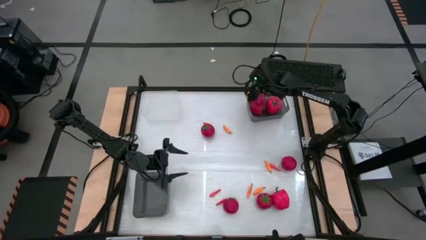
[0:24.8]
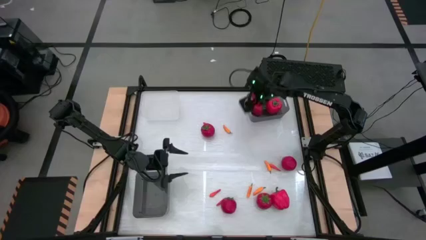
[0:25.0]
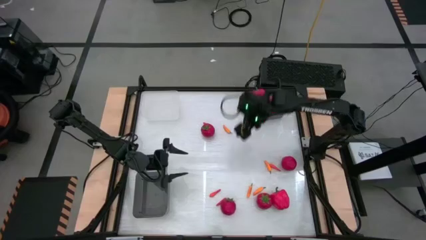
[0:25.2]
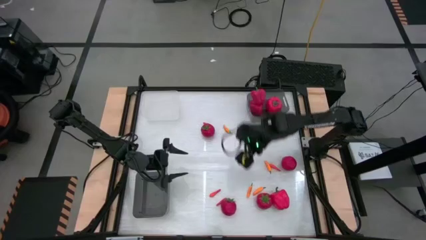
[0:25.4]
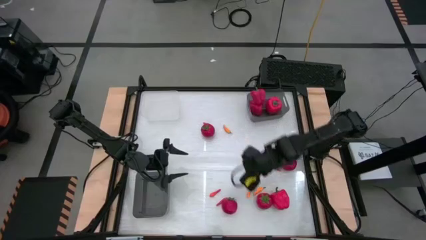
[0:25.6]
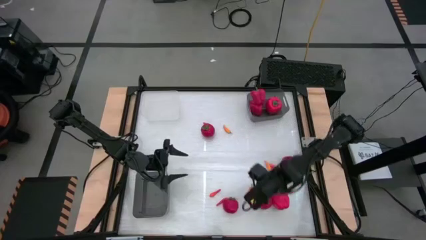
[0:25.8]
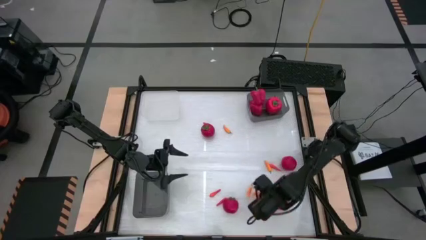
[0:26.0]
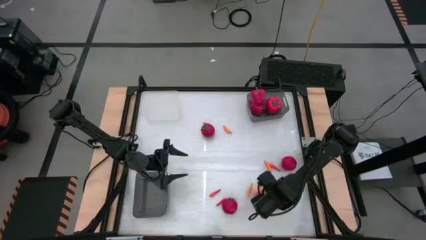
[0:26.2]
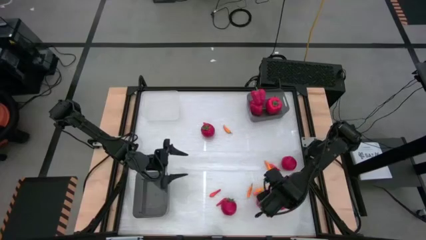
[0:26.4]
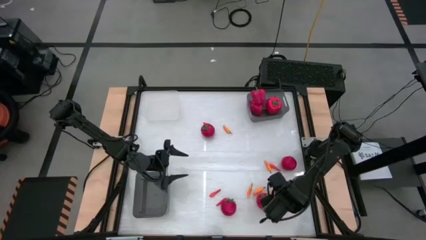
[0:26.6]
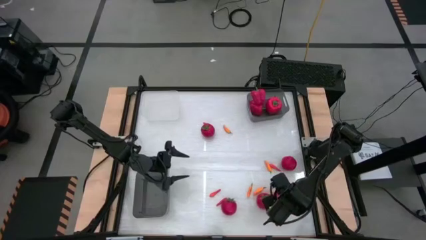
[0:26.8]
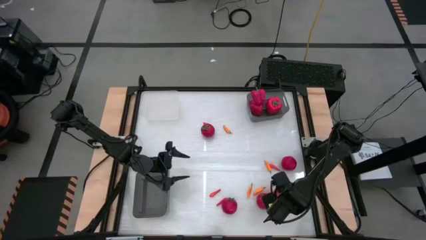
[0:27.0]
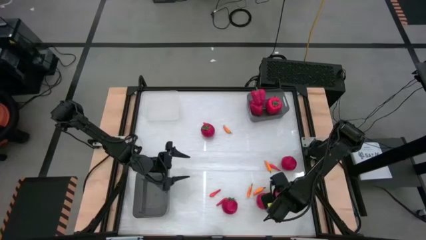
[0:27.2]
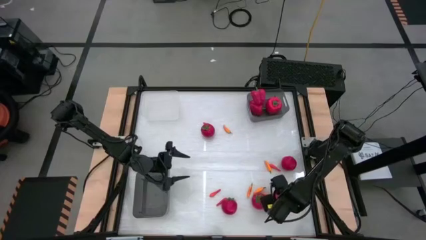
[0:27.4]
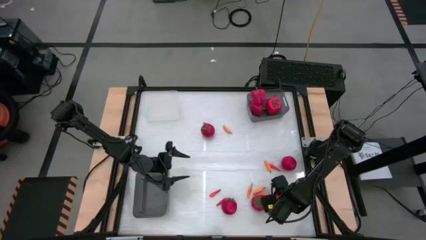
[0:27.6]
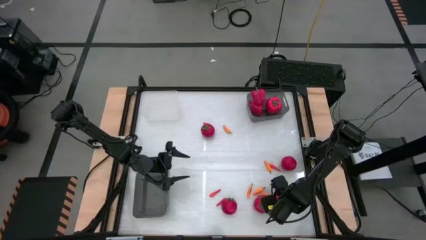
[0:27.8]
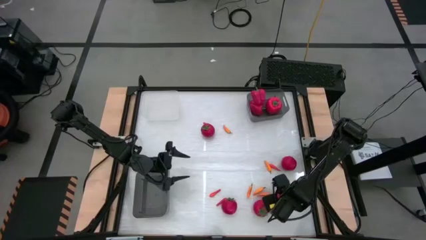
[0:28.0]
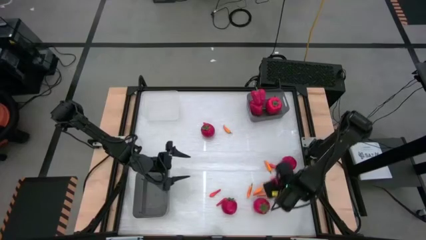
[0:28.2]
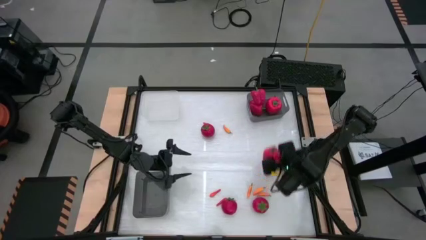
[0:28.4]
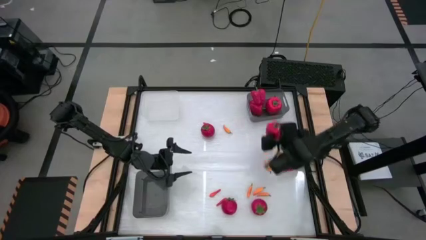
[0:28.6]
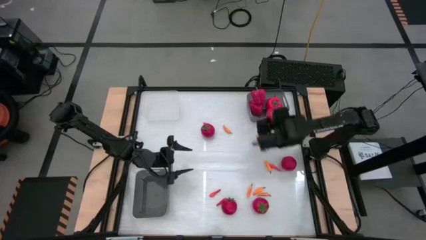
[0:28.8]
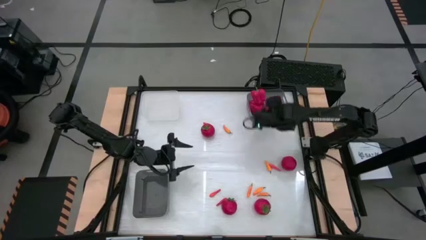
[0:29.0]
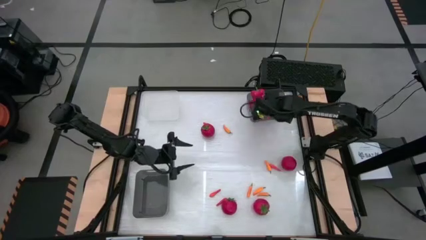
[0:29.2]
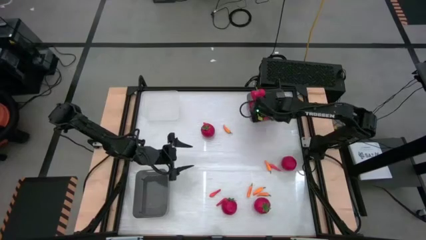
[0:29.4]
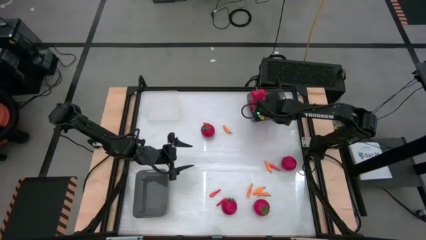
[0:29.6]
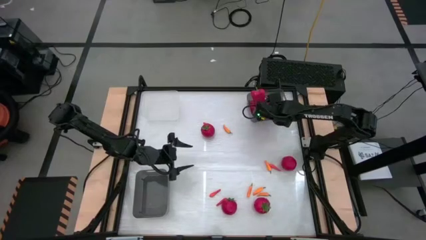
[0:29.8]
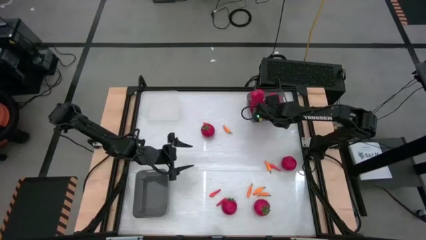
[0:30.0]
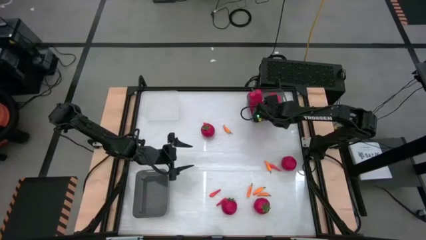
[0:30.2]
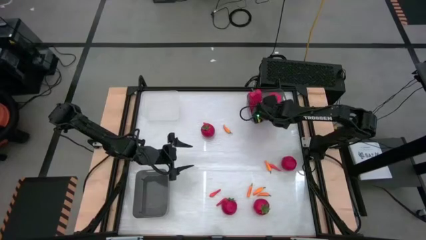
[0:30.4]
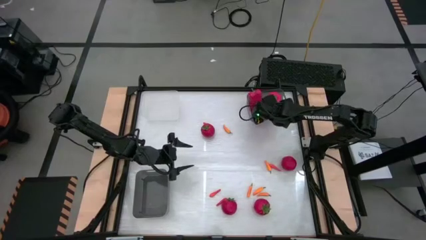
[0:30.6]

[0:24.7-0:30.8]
Task: Sort produce into baskets
Put the red bell pepper into the top black bin

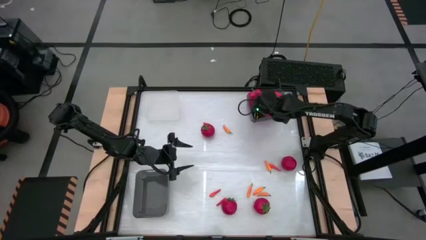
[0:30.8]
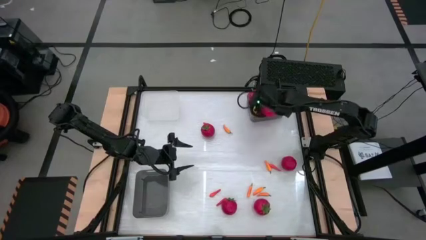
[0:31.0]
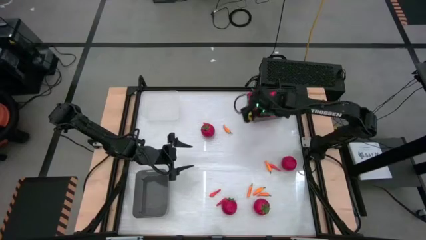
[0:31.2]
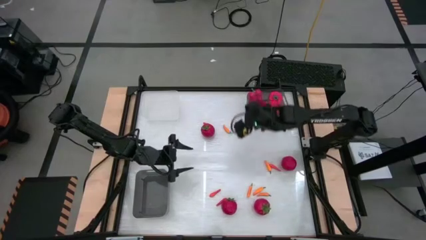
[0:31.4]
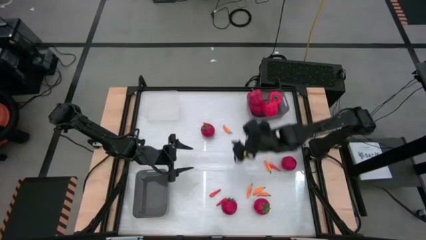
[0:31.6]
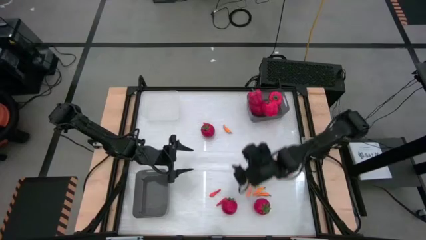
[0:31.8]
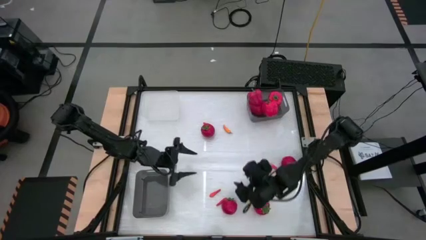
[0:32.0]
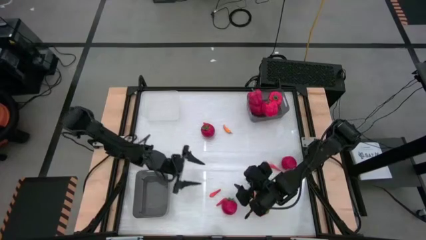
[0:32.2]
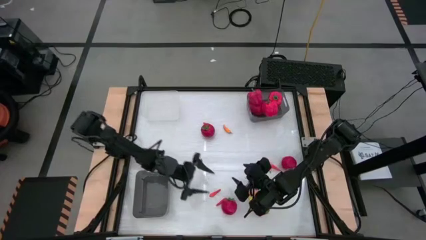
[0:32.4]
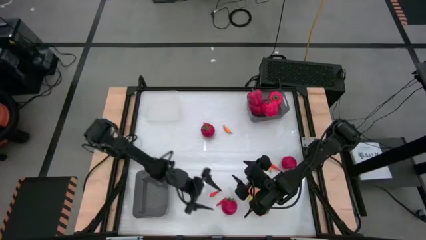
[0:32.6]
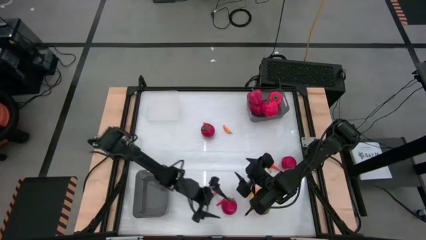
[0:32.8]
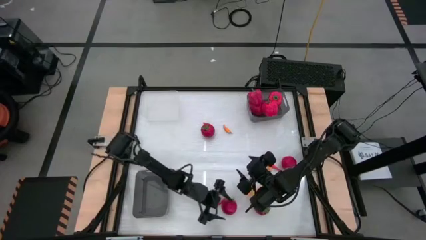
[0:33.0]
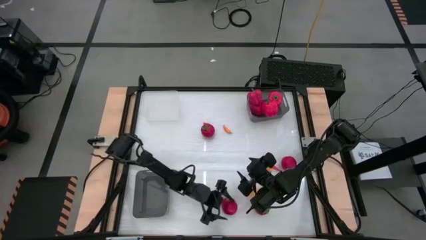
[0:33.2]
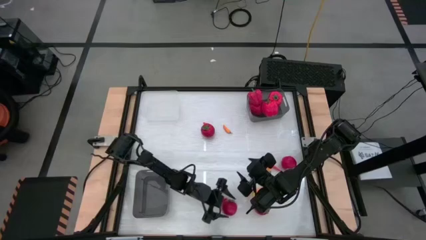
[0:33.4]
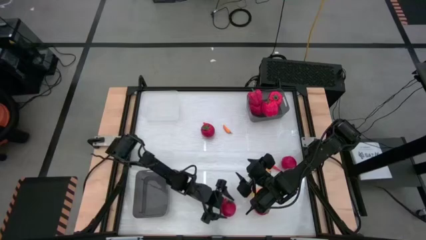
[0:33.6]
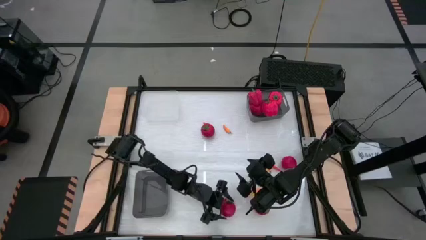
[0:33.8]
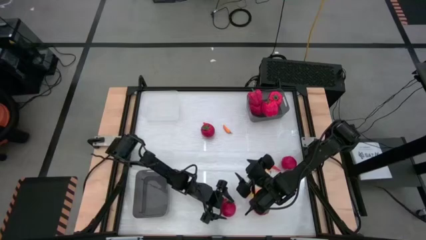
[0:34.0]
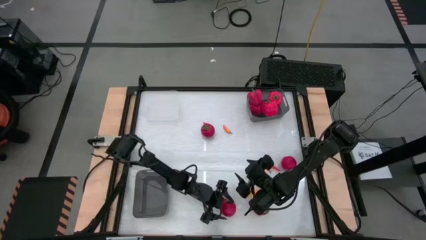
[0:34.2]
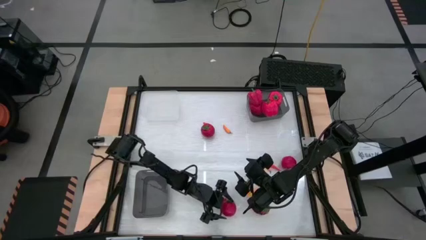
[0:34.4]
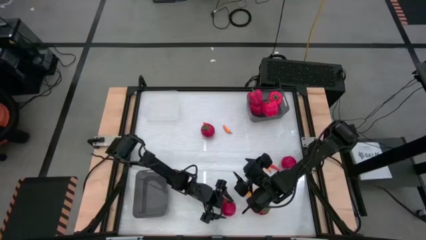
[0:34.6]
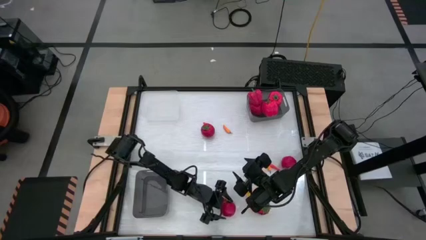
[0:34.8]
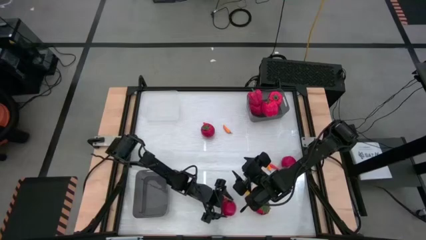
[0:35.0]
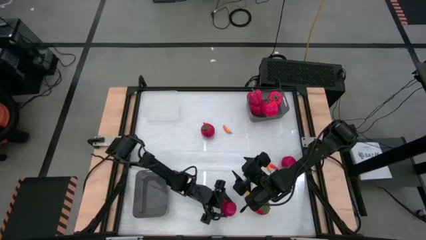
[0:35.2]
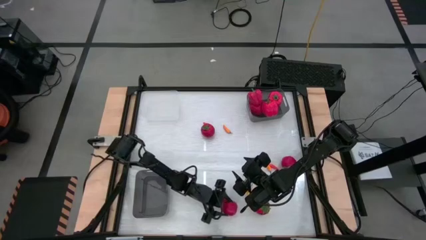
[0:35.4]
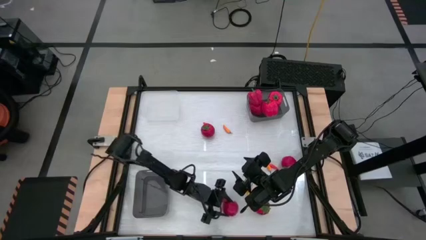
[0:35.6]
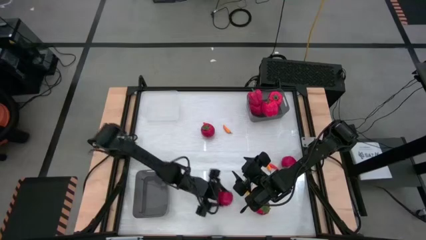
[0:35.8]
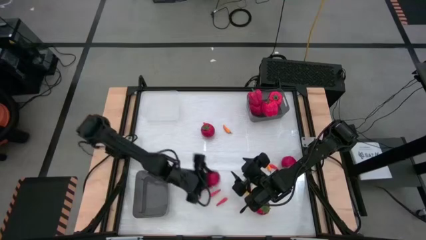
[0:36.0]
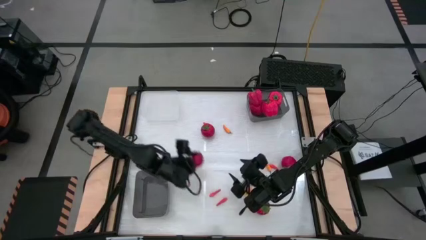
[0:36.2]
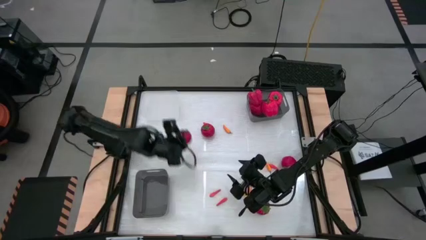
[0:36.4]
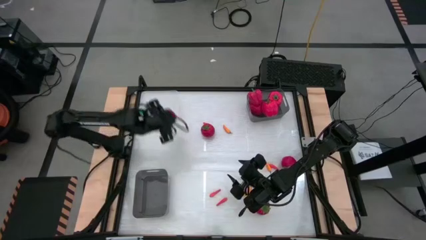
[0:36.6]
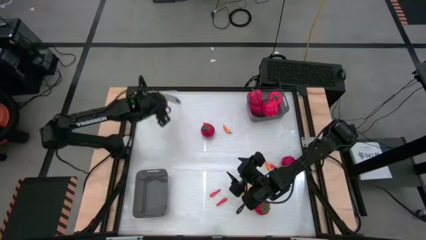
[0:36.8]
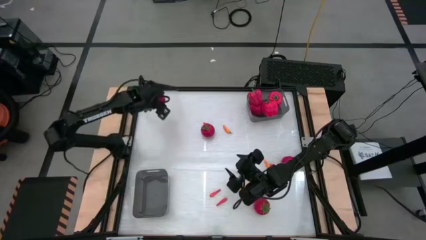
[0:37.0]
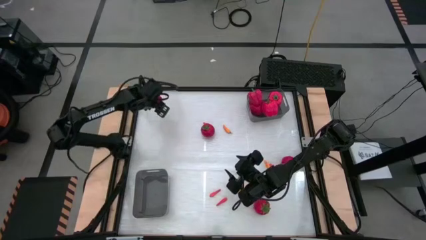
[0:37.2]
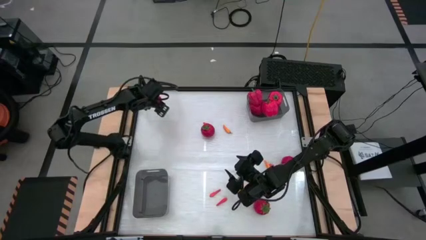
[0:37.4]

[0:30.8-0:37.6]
Put the red tomato into the transparent bin

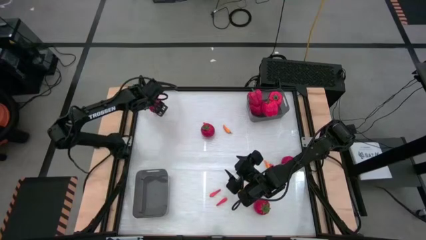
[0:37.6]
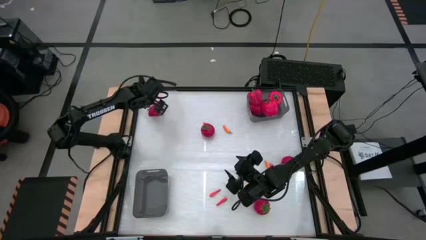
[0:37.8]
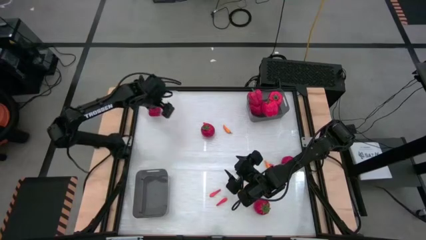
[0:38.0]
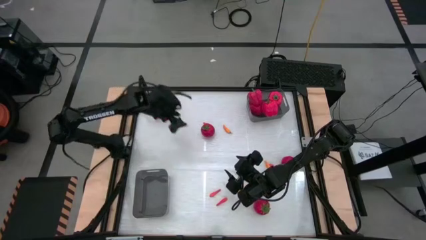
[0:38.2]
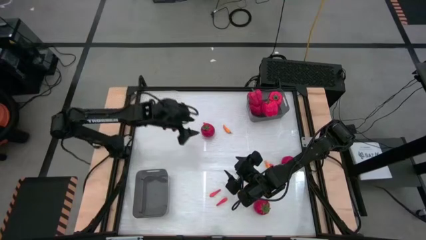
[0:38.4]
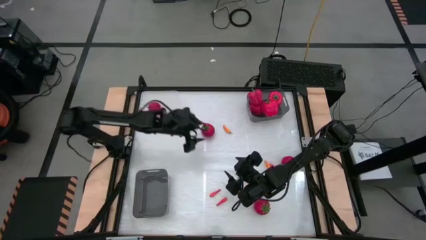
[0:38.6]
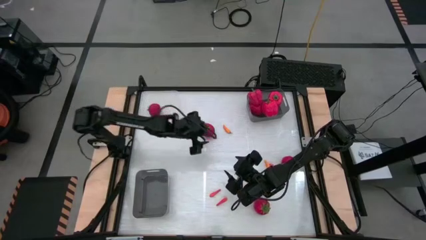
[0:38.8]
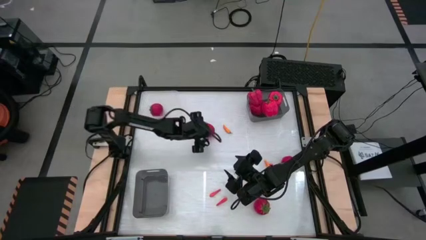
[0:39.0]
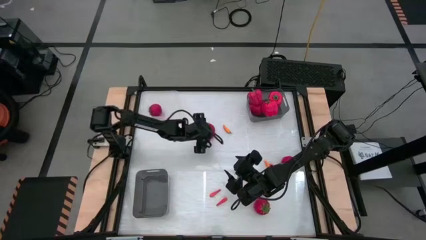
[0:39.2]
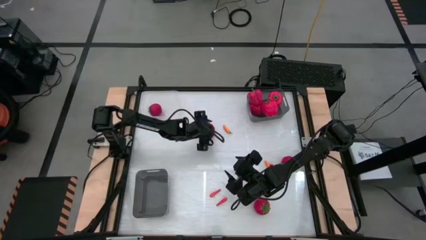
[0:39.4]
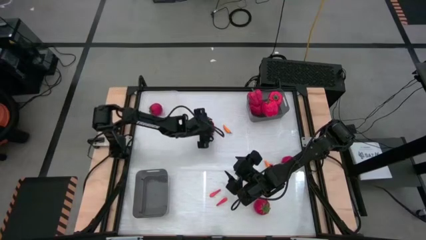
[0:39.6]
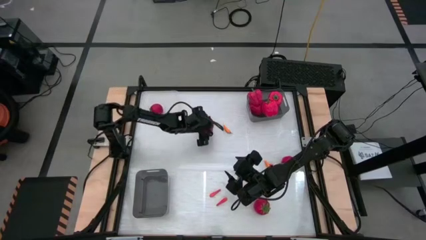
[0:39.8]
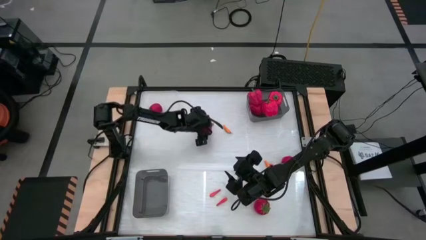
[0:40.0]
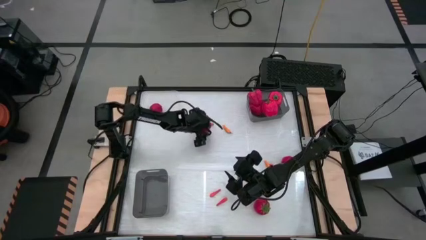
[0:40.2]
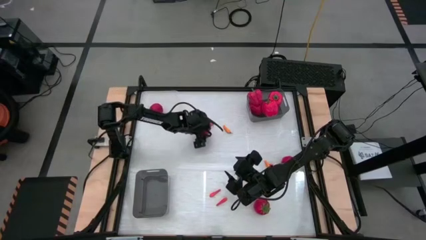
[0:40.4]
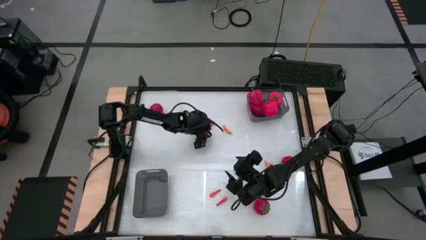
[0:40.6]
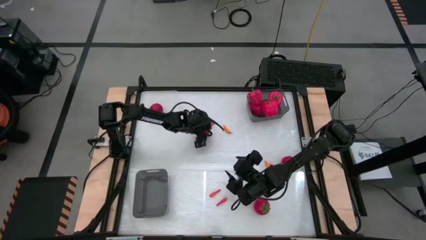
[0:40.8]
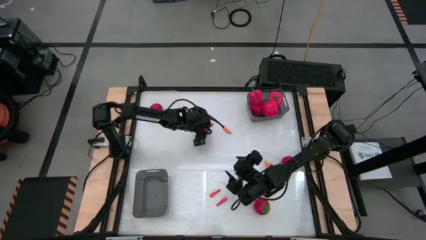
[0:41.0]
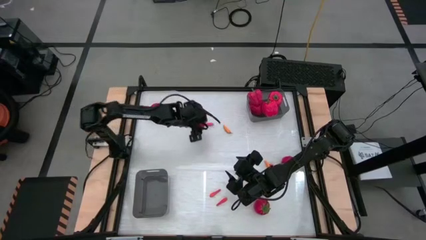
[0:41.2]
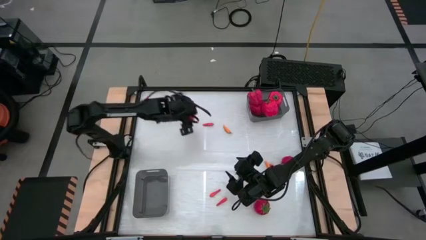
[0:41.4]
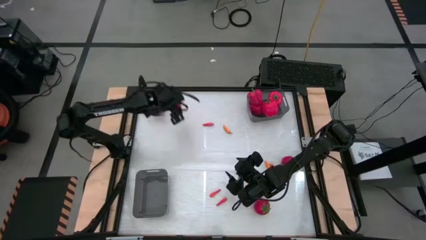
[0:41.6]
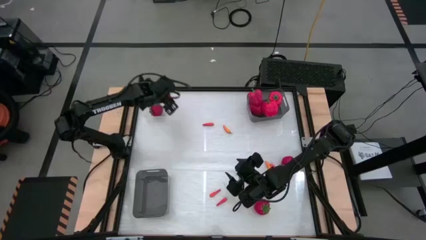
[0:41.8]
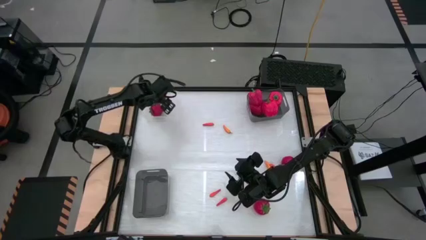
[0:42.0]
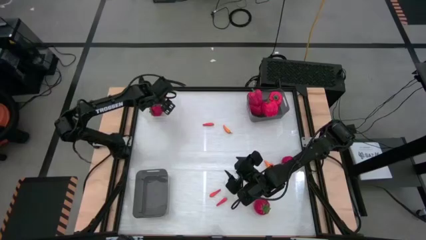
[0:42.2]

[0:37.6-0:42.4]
Put the red tomato into the transparent bin
